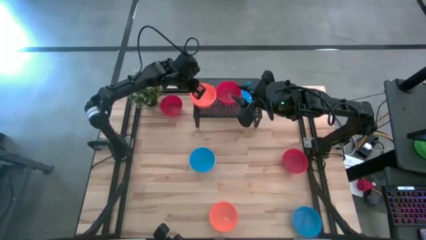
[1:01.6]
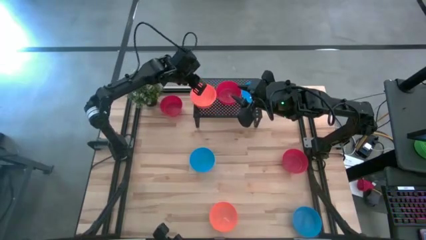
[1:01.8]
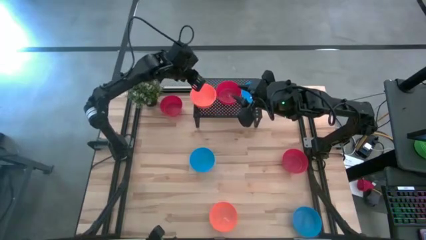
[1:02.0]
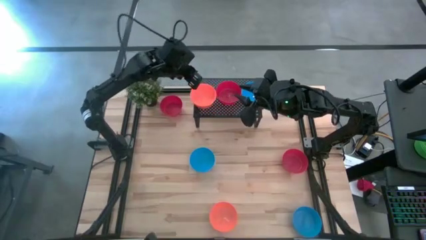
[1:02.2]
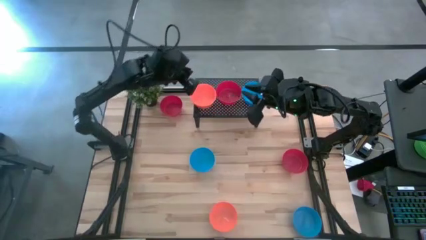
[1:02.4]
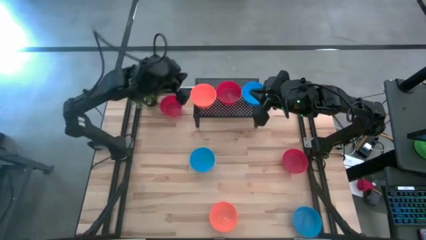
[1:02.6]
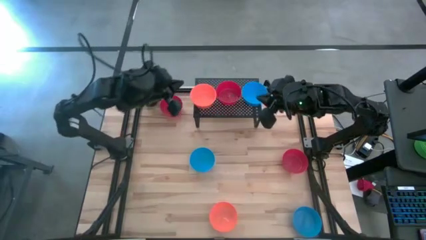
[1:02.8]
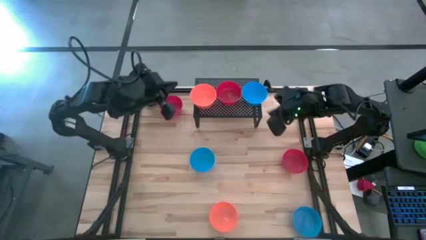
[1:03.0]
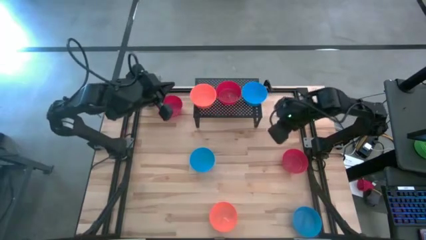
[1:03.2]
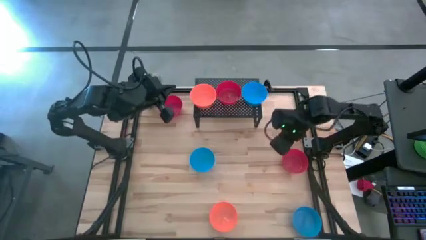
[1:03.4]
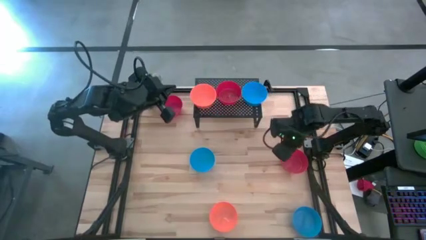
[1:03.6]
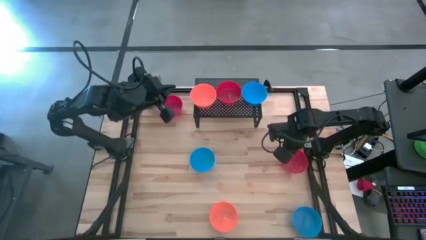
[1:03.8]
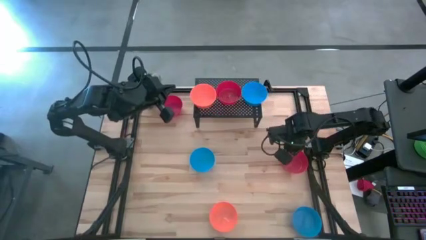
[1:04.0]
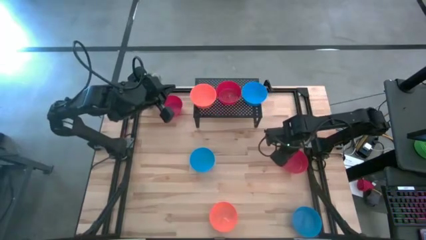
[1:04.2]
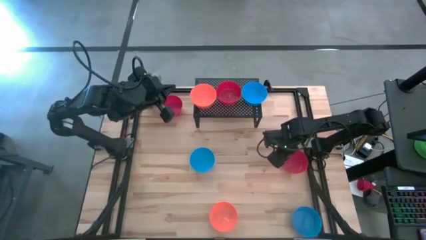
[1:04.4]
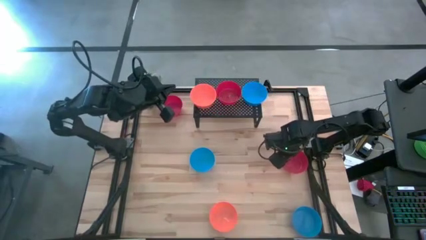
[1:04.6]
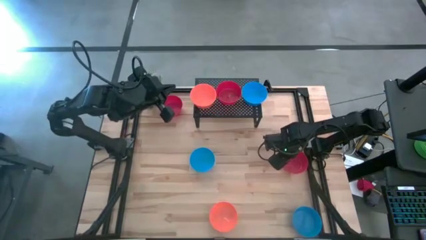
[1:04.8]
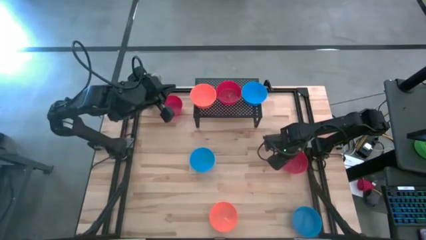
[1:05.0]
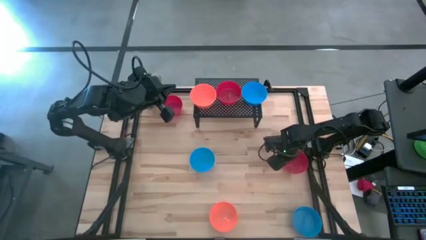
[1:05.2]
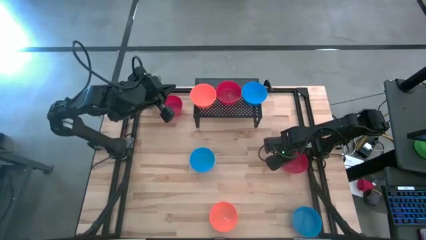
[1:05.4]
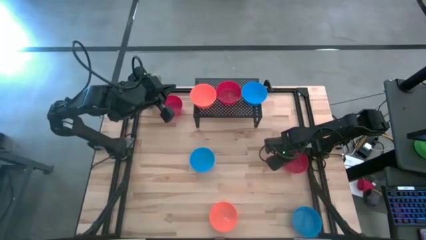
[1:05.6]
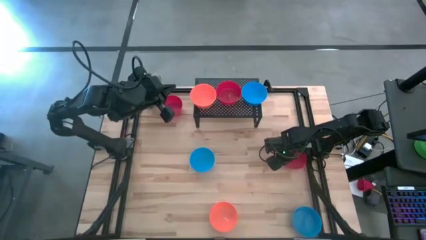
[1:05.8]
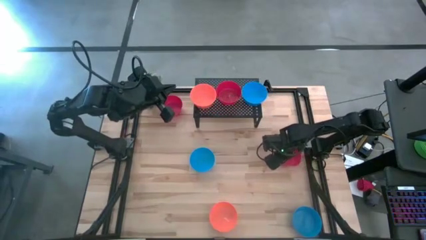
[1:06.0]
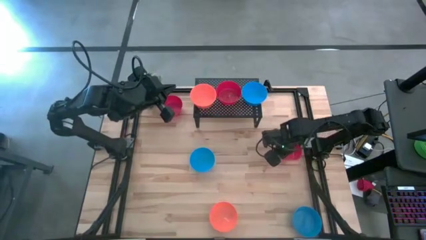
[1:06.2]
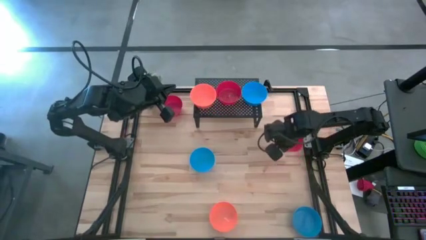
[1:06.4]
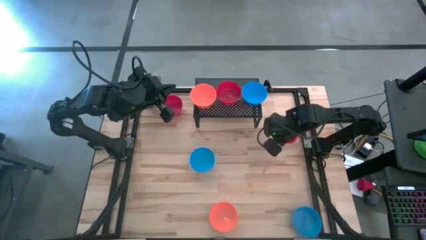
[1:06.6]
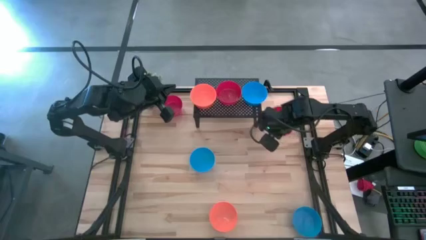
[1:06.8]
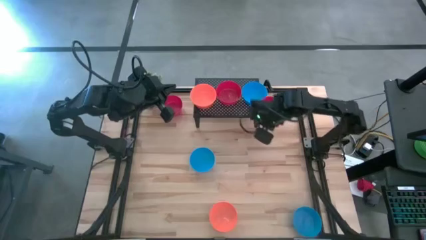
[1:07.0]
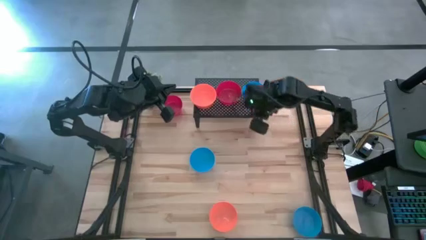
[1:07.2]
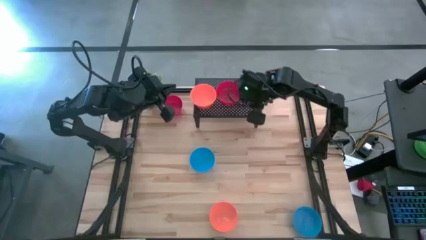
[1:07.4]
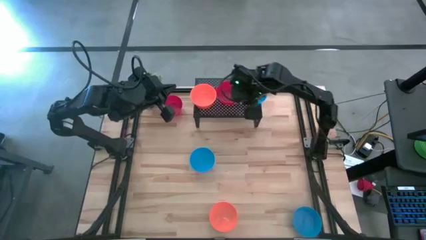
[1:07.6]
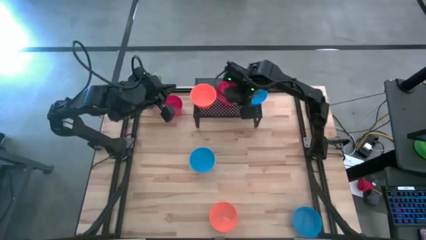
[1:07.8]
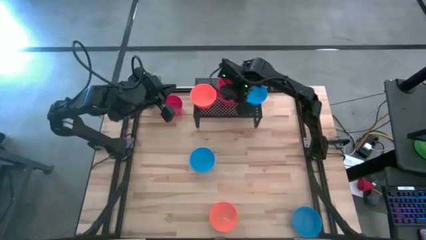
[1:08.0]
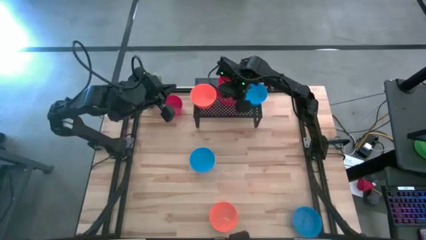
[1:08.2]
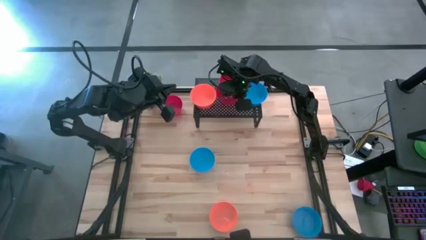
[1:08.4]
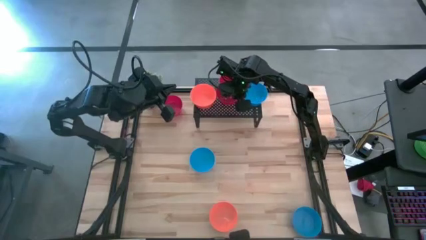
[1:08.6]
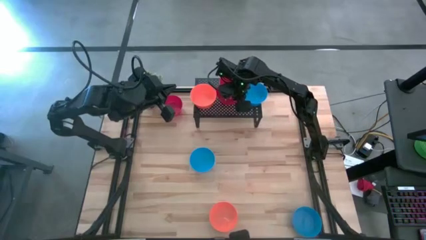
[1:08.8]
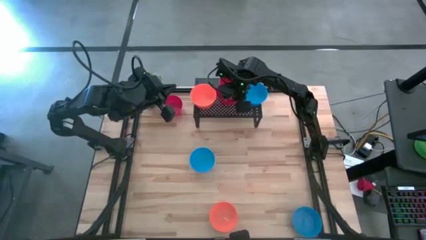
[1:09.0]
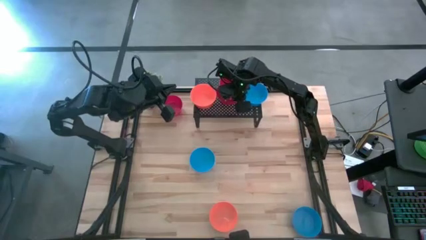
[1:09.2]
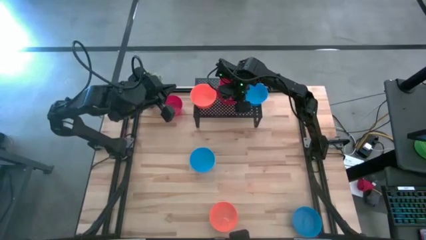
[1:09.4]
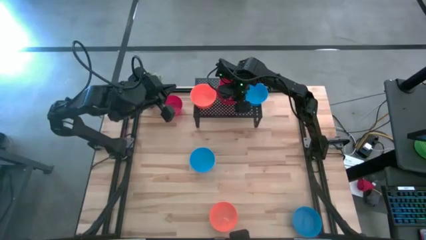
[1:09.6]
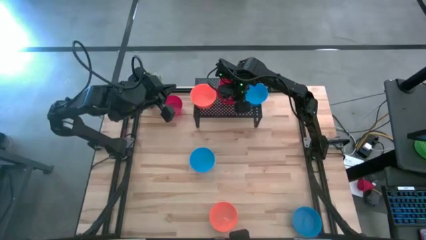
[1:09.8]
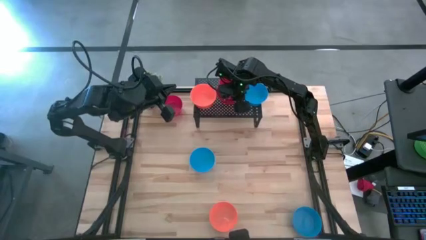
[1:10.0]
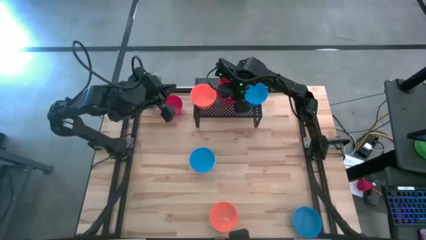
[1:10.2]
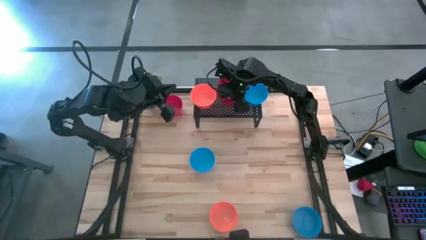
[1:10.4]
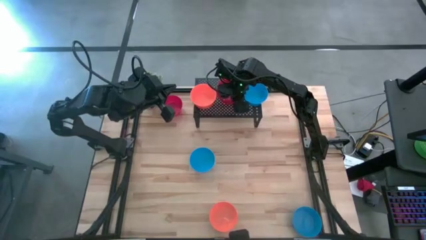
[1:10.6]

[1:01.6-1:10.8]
Task: Pick & Place Mini bowls
Stack the bottom red bowl on top of the red bowl on the shelf

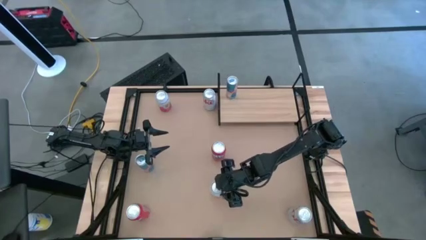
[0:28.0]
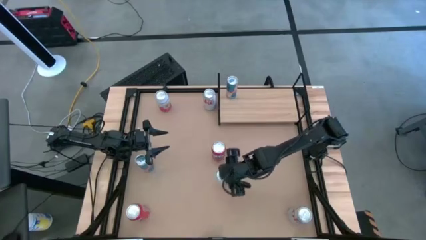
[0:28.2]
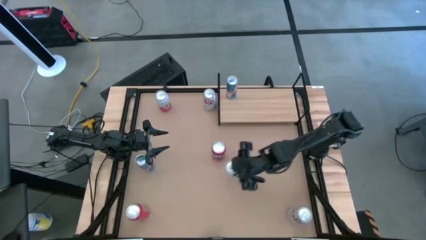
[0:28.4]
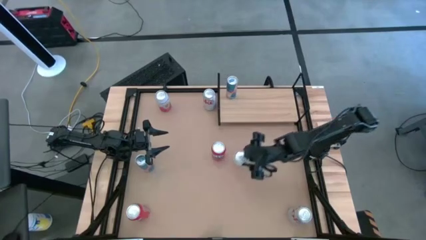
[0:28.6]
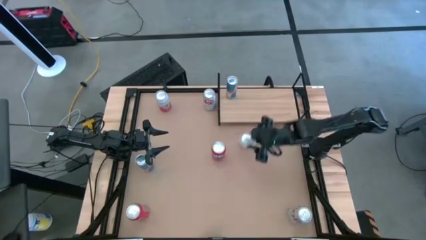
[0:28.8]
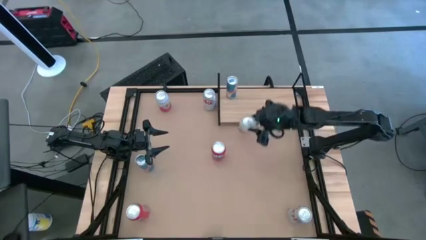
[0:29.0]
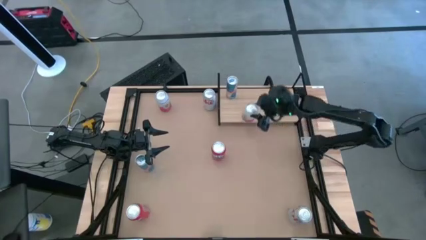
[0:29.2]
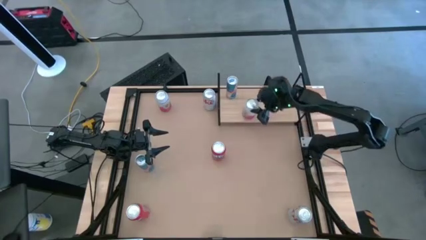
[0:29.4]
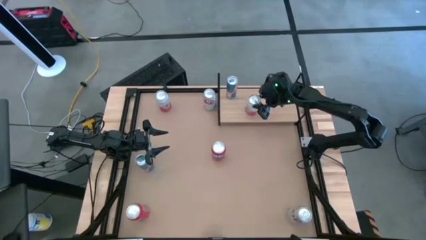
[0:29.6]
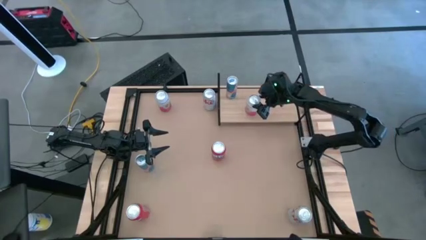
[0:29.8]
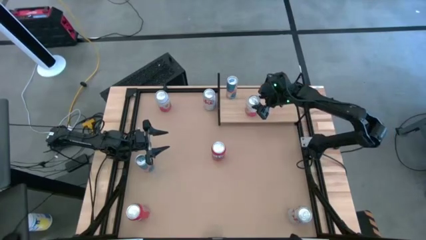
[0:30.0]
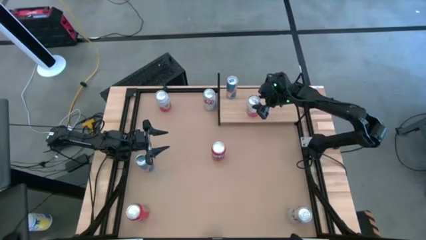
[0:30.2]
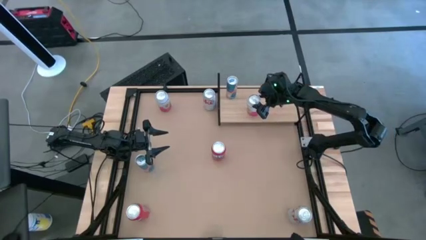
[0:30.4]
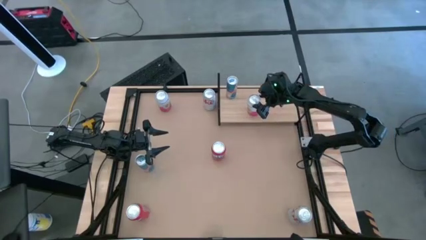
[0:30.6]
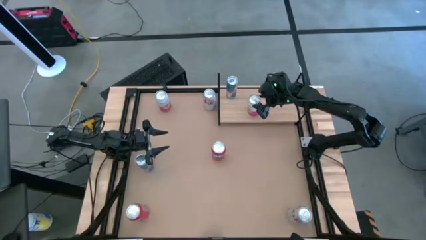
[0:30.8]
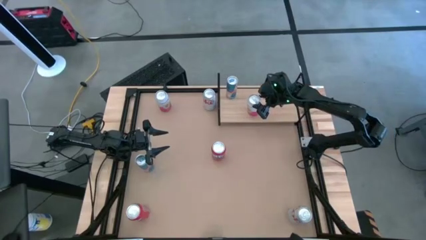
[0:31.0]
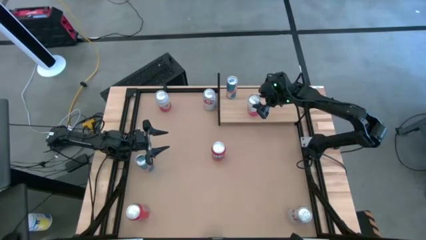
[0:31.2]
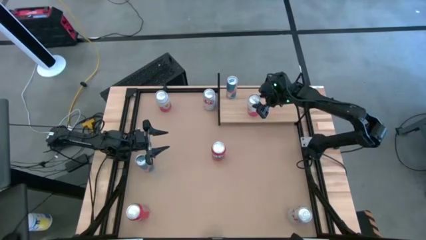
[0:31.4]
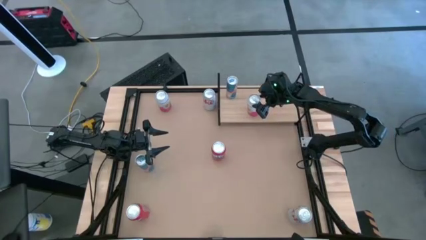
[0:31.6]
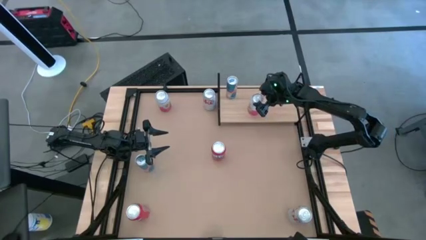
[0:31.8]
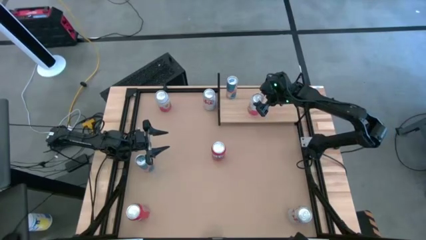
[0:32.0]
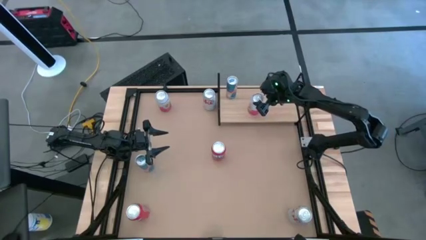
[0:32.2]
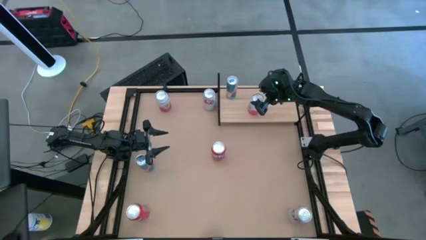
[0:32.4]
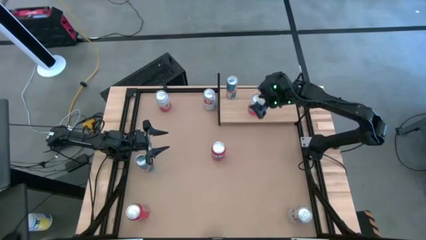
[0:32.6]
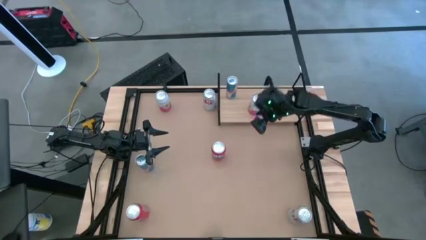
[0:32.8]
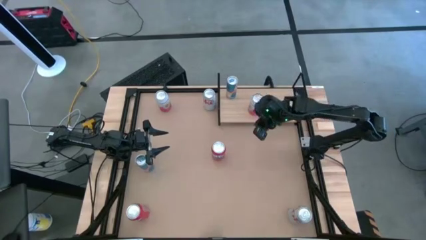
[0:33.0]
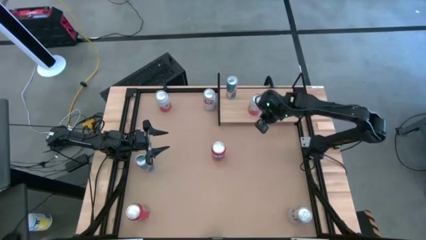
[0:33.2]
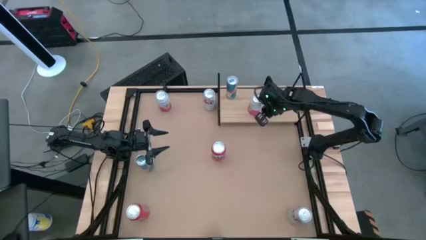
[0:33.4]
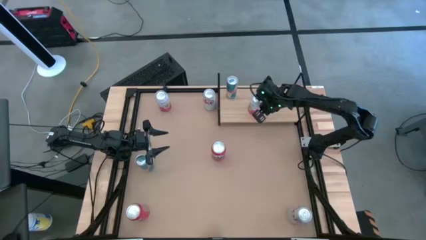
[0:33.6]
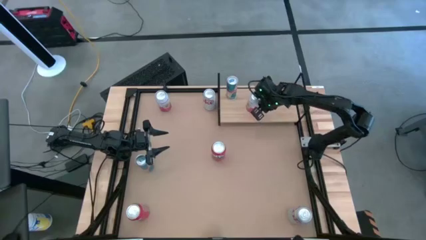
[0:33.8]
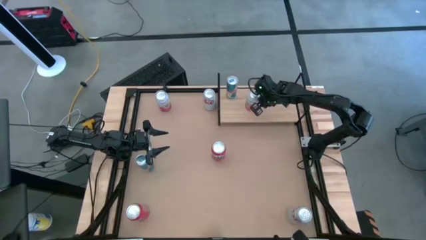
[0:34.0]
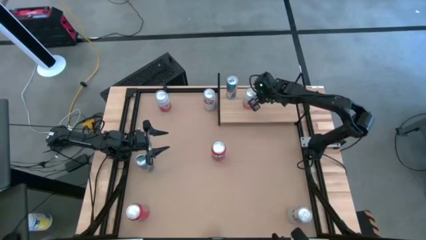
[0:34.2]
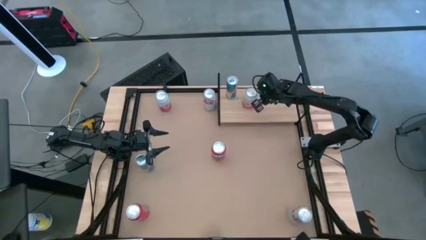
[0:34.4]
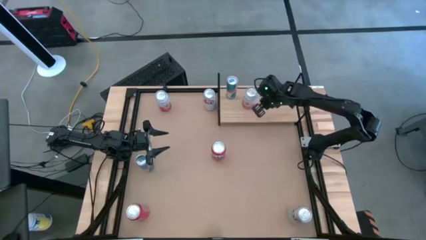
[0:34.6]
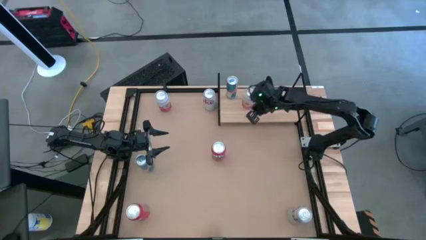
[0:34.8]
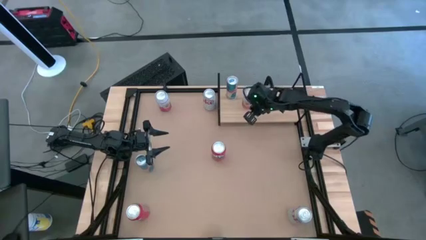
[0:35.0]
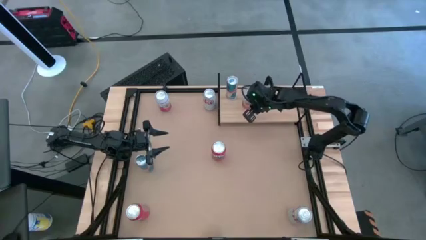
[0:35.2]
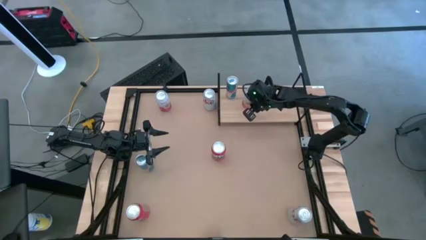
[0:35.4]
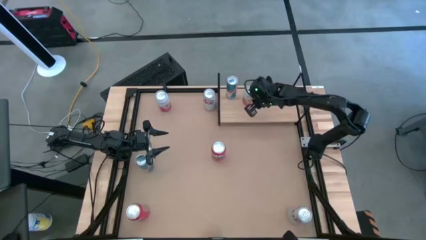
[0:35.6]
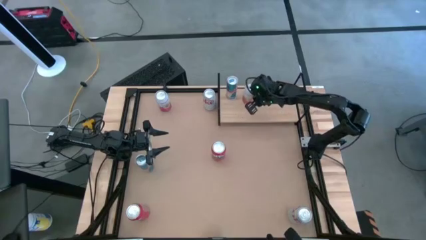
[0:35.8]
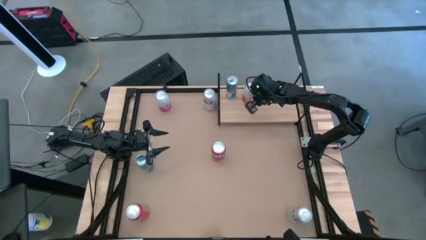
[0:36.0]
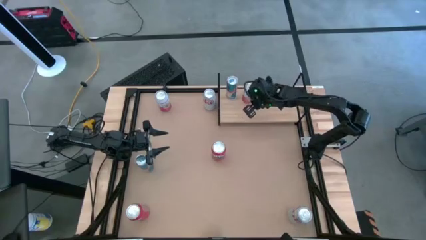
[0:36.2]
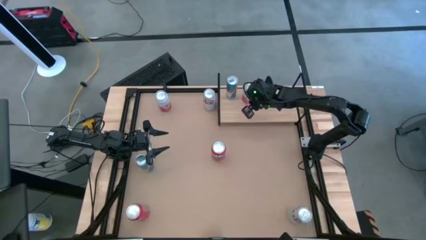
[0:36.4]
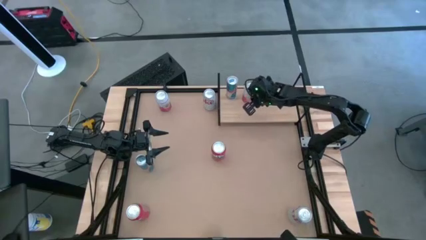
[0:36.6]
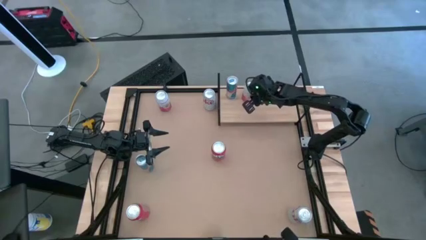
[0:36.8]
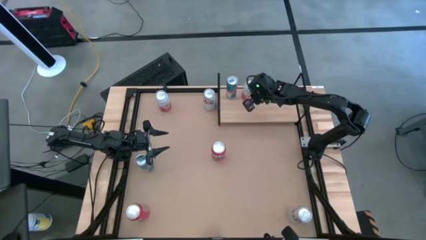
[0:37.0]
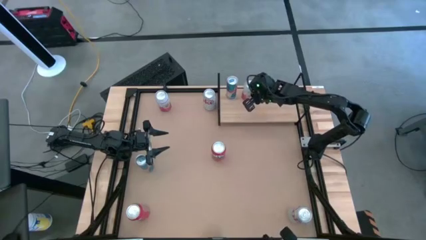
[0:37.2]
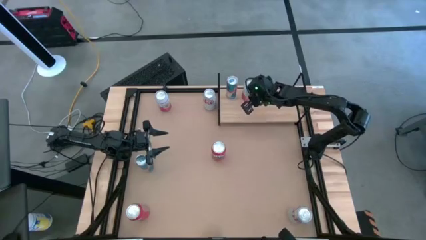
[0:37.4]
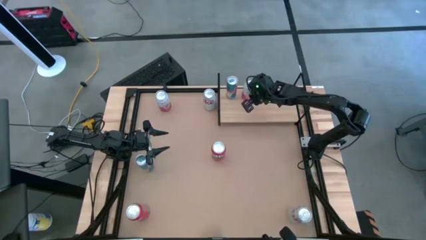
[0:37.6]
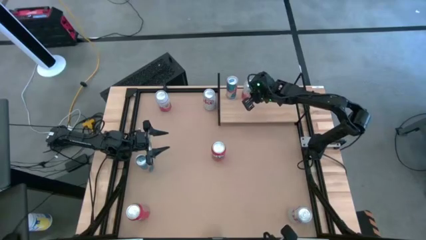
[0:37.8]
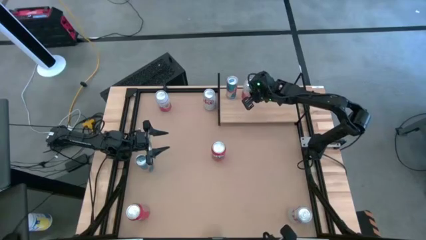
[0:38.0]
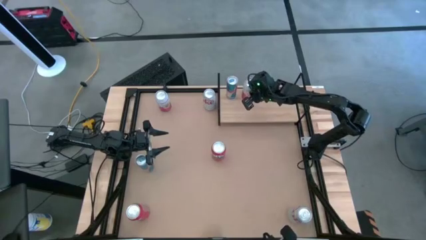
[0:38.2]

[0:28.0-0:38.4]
Task: Place canned beverage on shelf
Put the bottom pink-white soda can on the shelf
